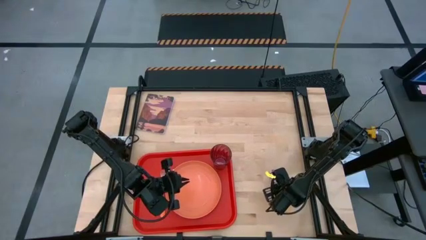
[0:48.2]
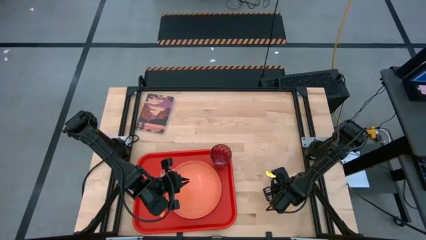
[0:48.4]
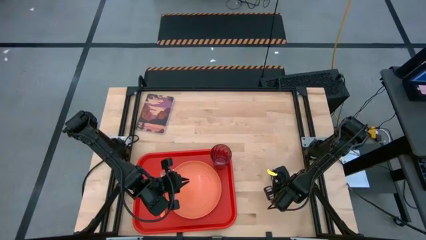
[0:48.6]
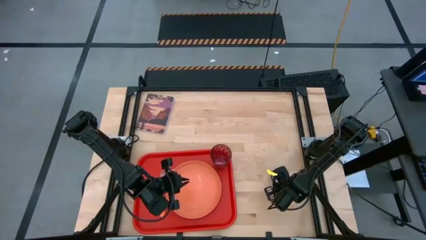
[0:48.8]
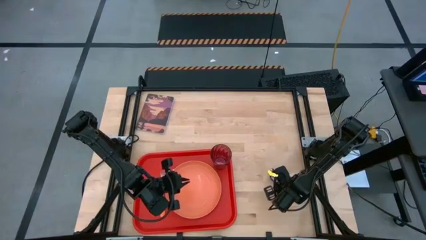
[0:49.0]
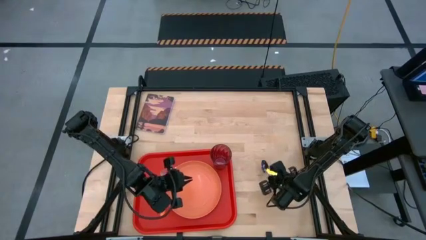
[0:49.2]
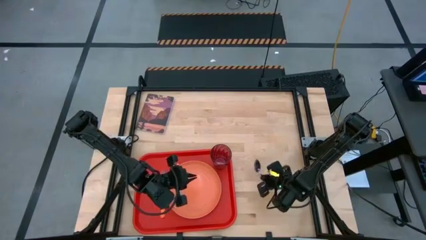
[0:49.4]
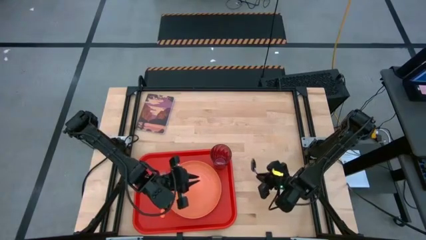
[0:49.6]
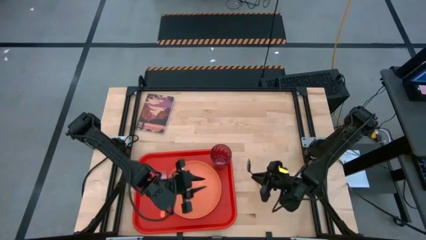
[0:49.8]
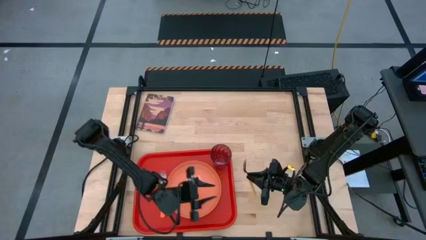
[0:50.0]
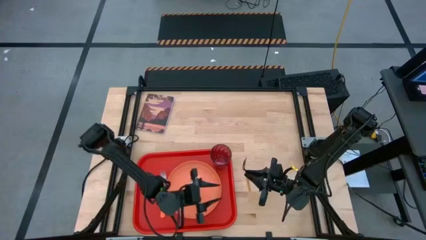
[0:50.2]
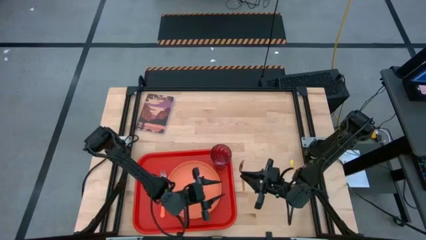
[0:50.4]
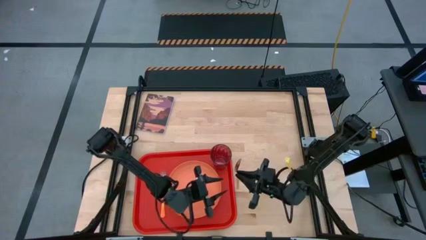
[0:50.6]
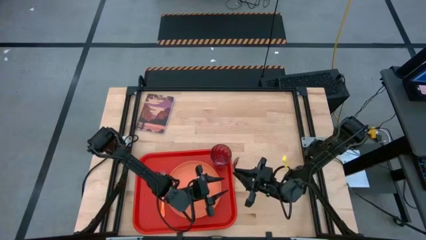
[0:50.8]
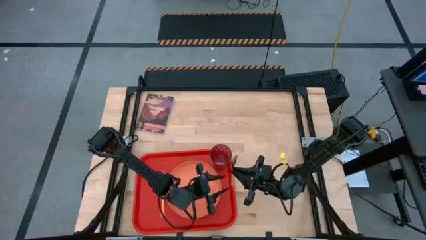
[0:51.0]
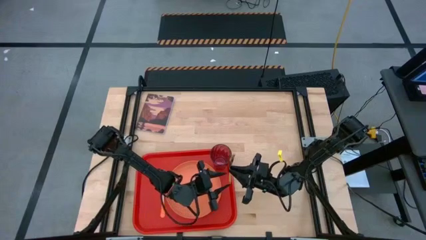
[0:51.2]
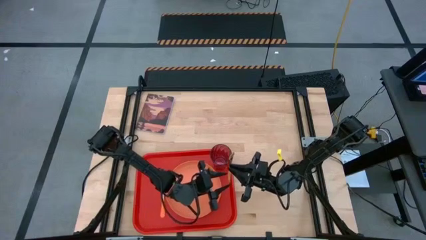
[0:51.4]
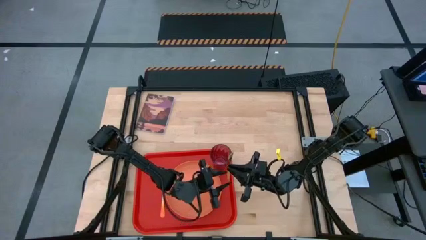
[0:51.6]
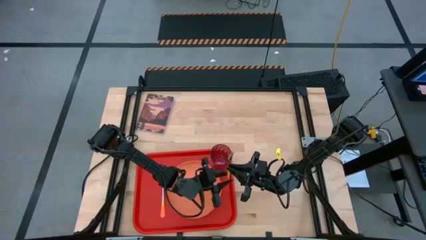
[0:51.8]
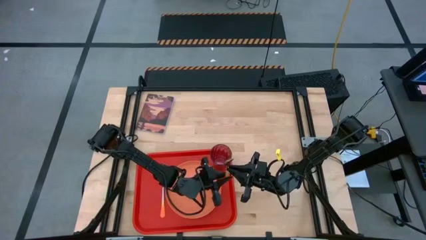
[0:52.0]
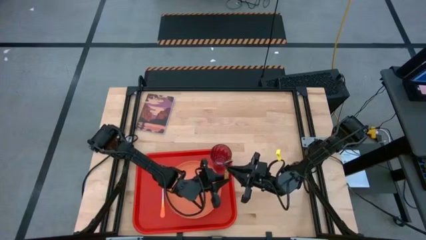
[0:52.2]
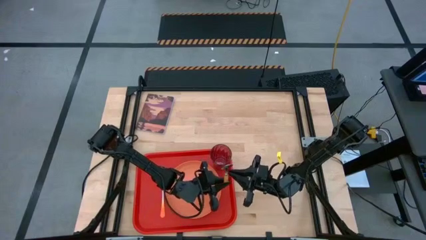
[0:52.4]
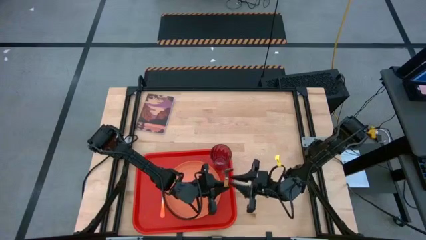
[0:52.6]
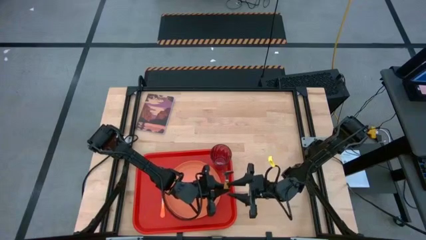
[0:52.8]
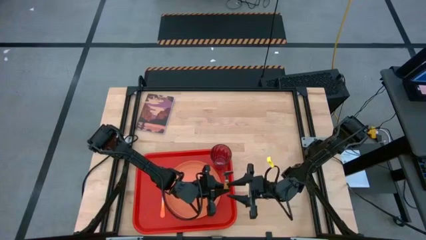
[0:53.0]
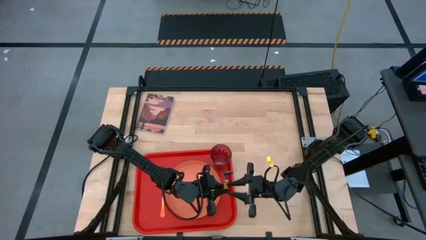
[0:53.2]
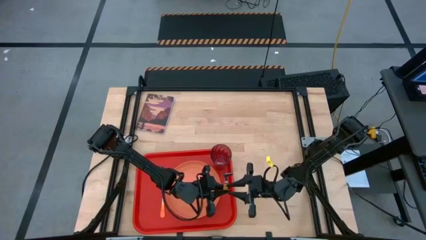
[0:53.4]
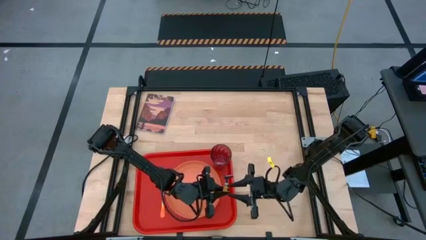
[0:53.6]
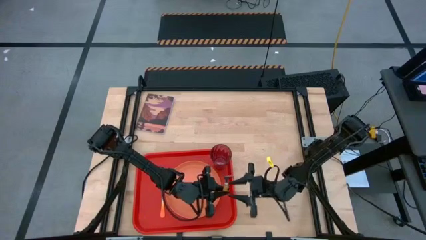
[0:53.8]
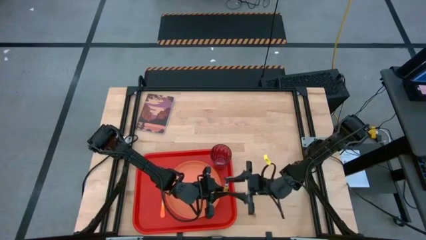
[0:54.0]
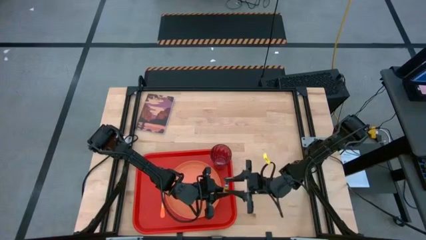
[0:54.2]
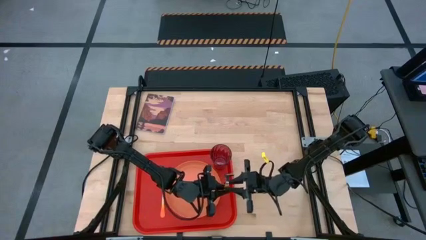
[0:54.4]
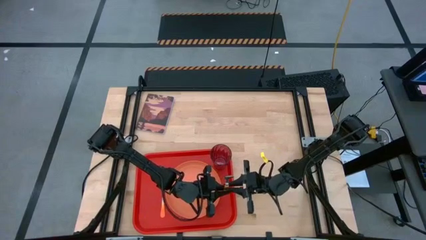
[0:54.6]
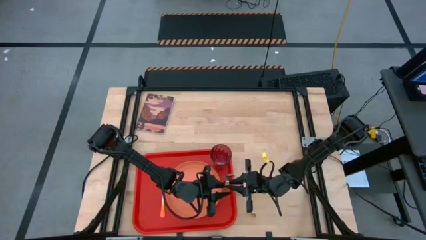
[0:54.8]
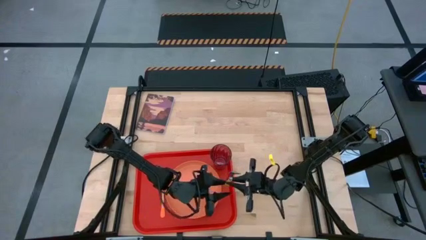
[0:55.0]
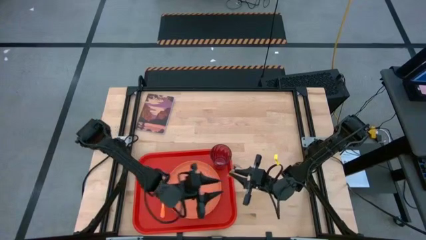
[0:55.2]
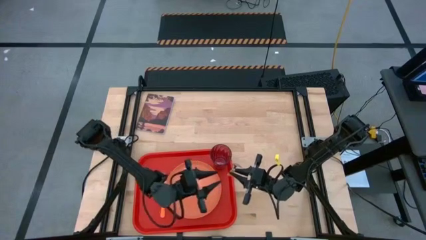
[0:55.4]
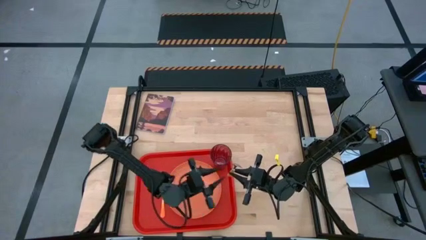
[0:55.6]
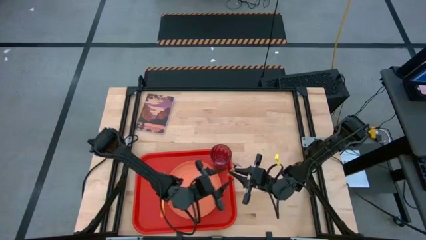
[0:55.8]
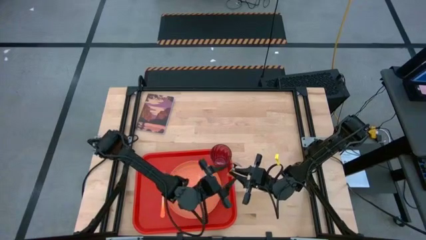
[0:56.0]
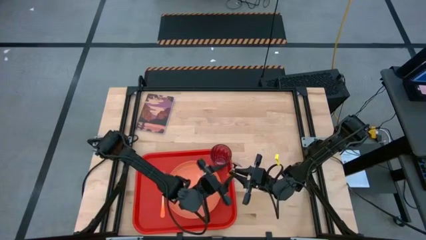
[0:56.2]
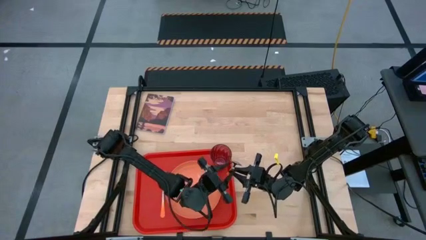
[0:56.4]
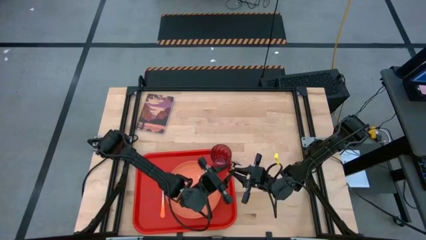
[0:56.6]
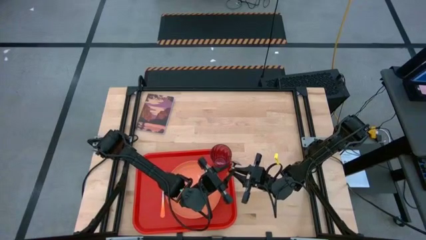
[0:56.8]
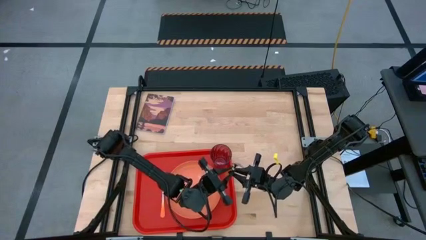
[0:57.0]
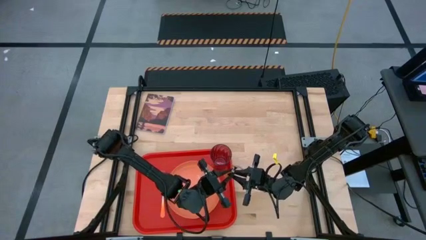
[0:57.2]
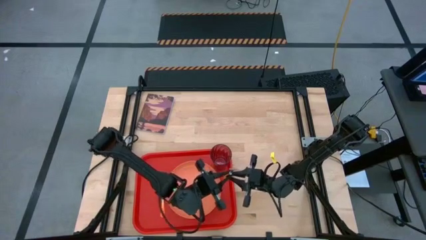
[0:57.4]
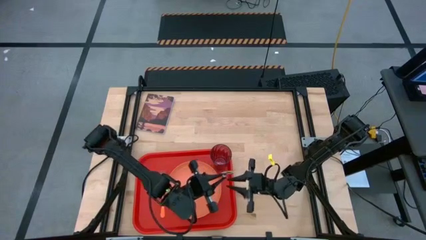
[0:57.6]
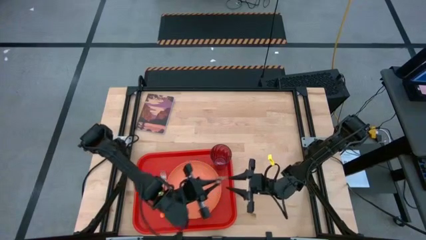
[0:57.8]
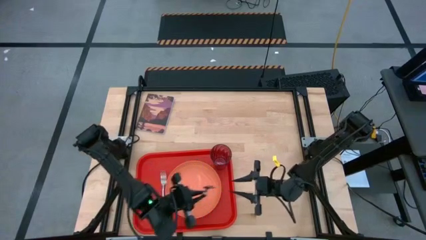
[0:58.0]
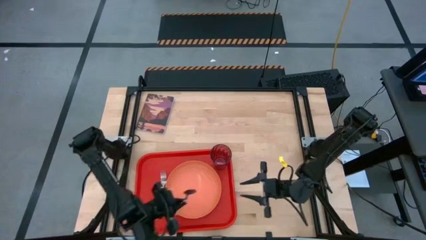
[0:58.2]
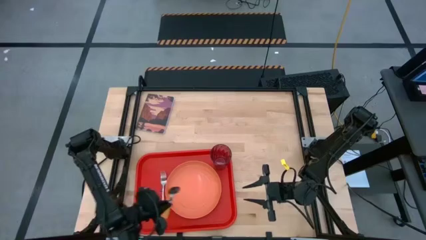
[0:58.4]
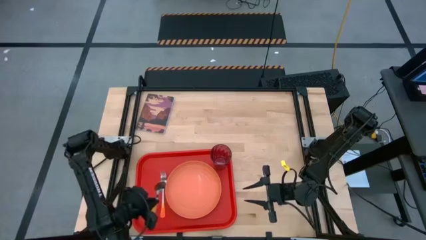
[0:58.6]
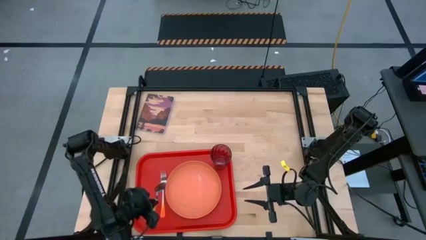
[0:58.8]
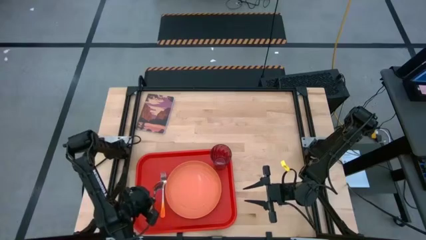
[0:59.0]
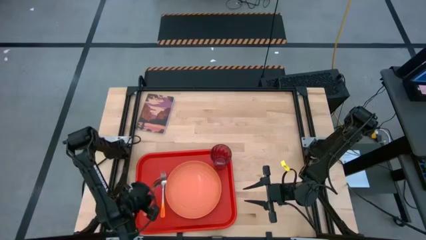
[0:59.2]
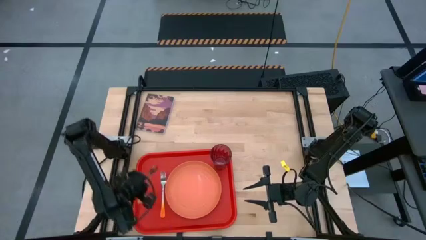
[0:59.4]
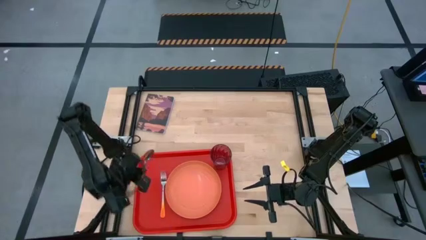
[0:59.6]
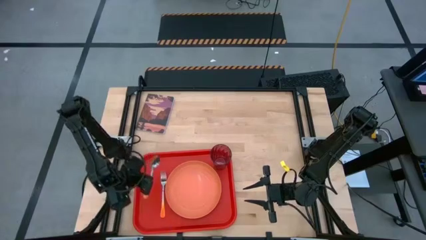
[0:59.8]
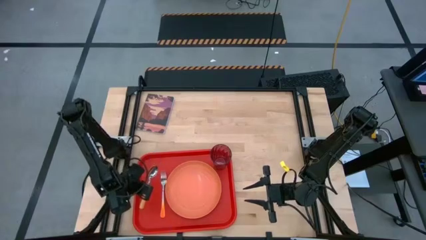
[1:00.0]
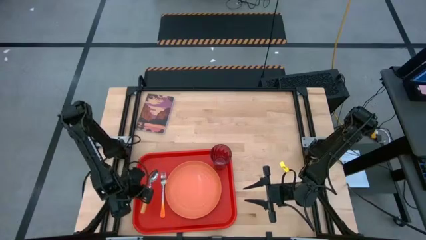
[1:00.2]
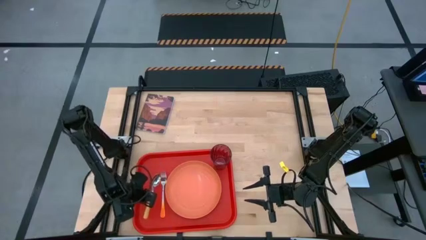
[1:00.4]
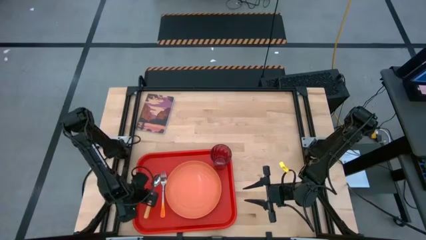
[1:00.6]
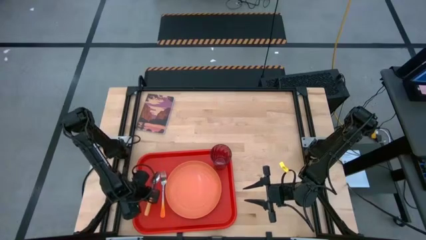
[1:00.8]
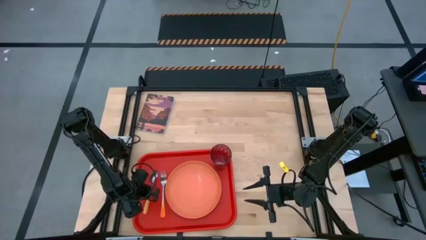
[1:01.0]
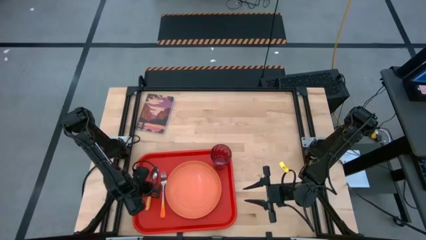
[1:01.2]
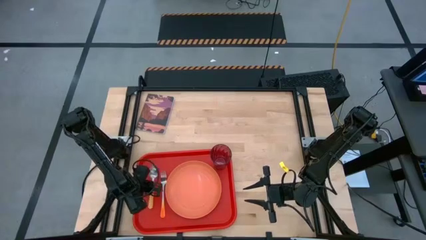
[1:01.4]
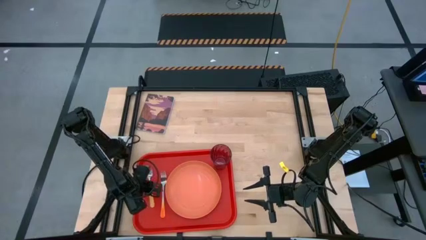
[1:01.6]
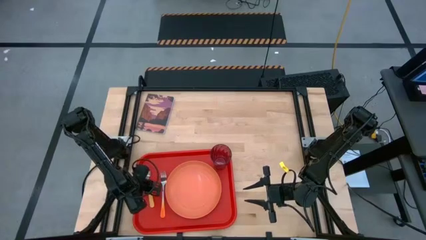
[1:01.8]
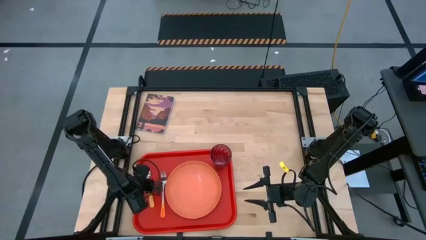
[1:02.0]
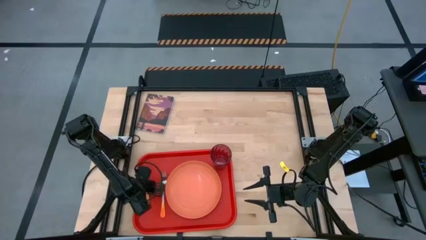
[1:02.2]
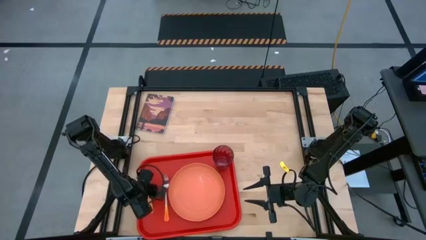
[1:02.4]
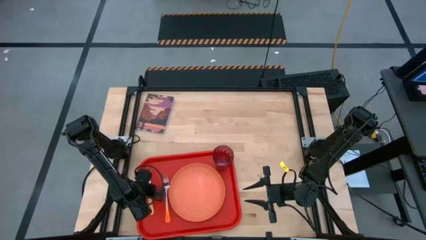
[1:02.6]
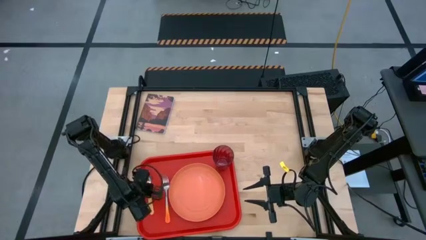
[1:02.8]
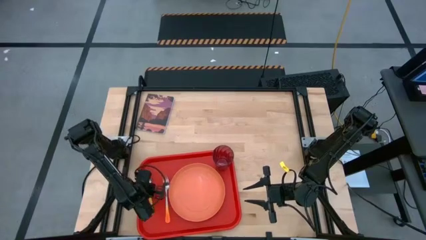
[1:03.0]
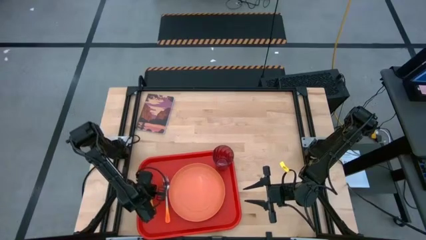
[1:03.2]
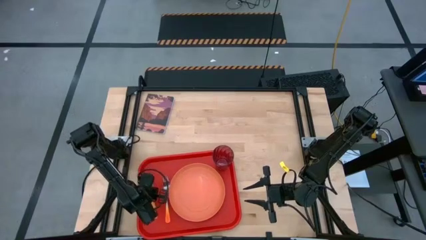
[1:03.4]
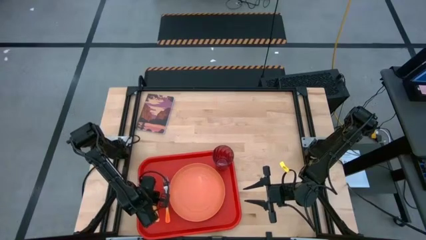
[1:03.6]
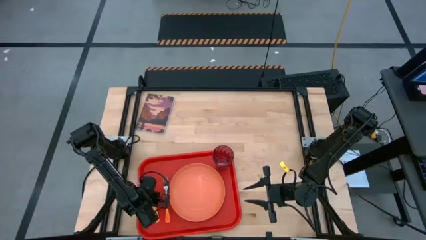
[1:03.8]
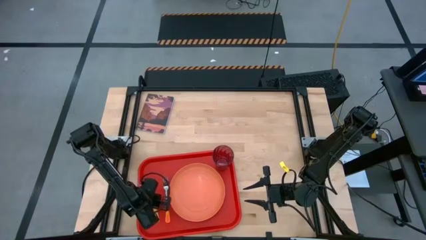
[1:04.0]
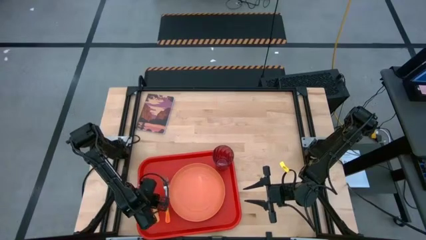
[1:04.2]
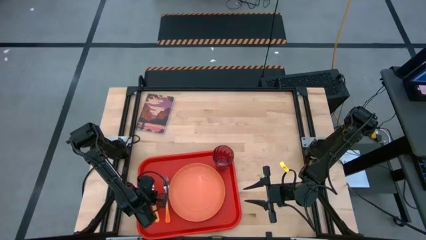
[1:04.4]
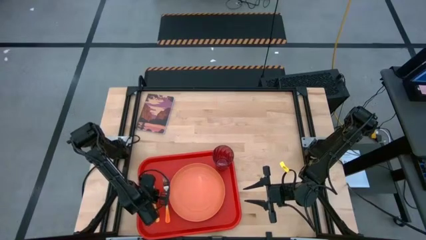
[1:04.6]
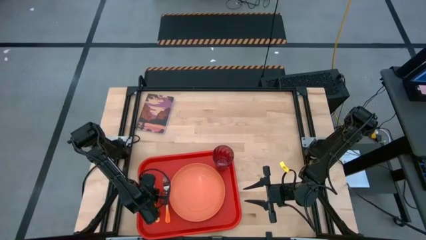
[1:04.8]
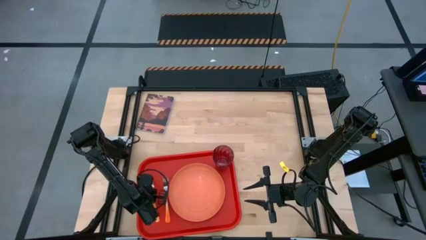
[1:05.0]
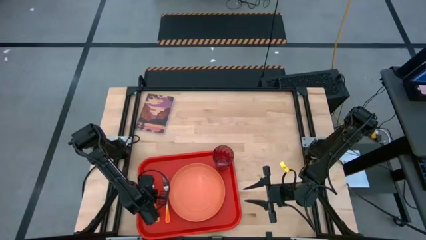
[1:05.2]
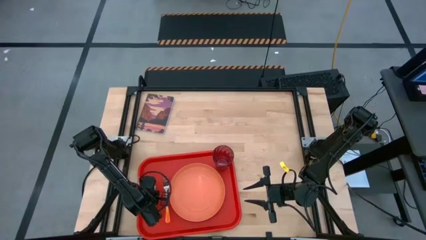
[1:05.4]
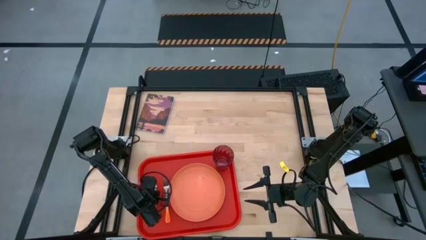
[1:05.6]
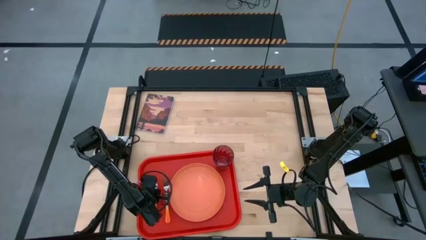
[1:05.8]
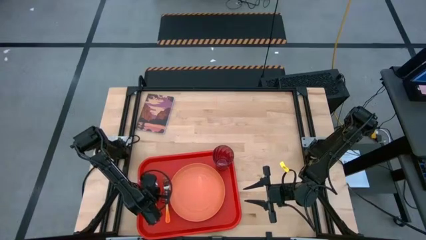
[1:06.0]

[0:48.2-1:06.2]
Task: Pick and place plate/cup/fork/spoon on tray
Put the yellow spoon on the red serving tray to the left of the orange fork
